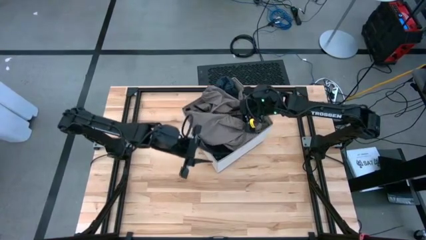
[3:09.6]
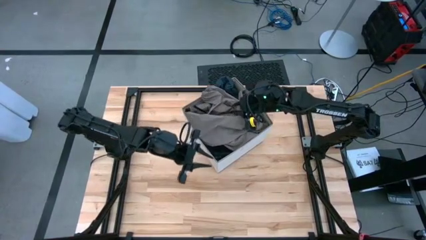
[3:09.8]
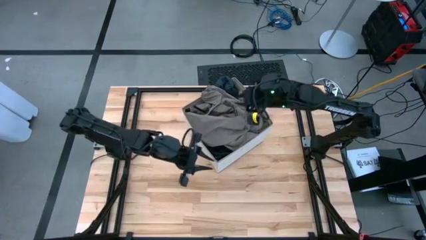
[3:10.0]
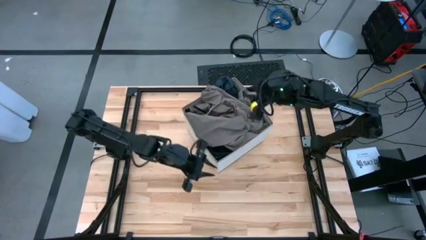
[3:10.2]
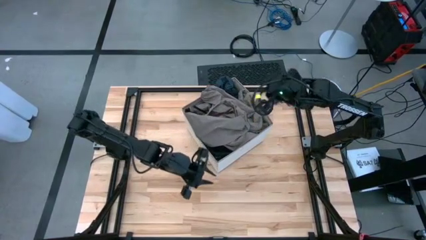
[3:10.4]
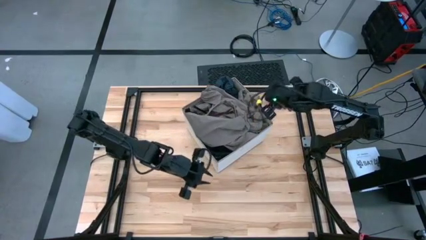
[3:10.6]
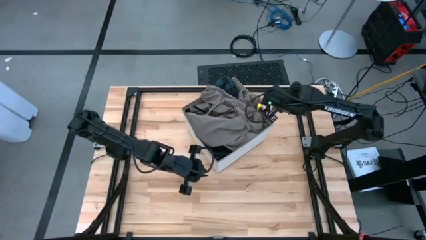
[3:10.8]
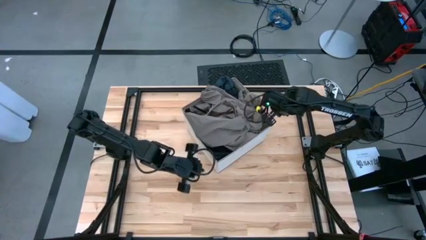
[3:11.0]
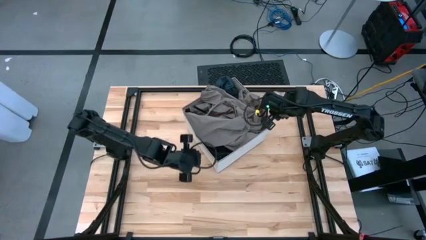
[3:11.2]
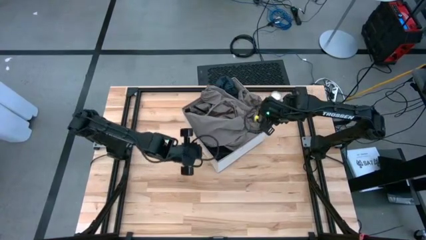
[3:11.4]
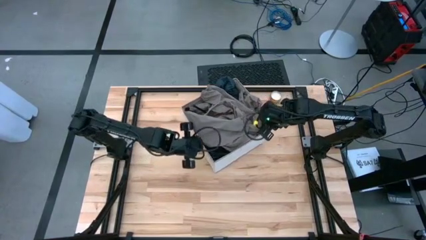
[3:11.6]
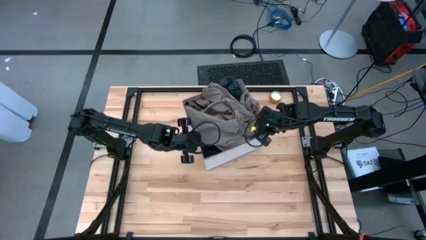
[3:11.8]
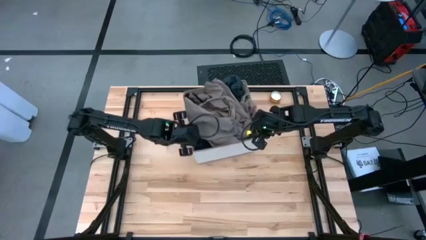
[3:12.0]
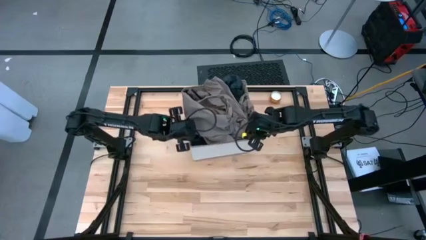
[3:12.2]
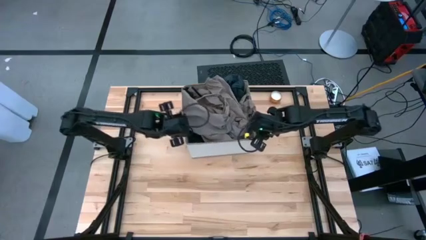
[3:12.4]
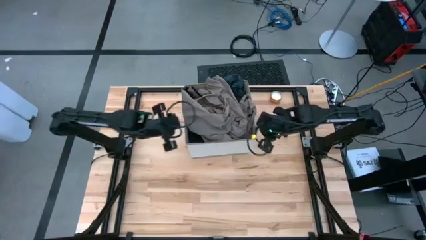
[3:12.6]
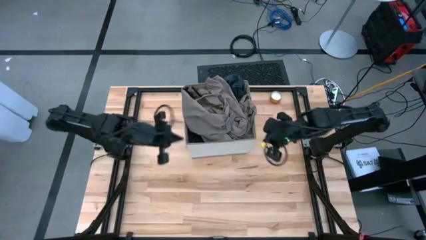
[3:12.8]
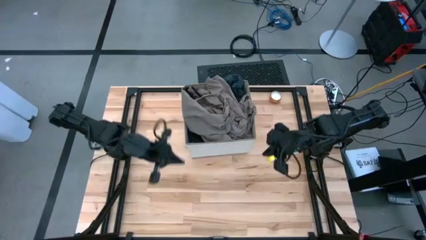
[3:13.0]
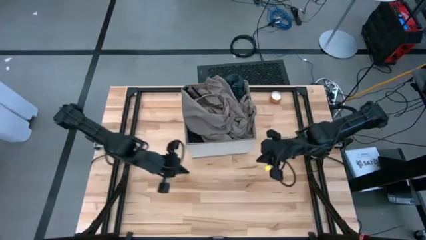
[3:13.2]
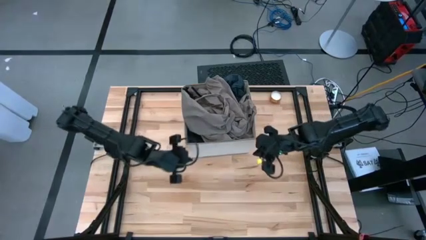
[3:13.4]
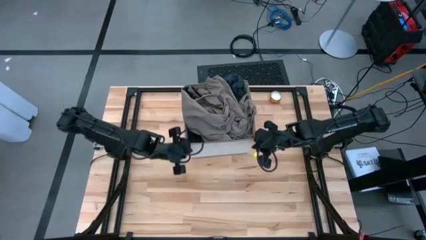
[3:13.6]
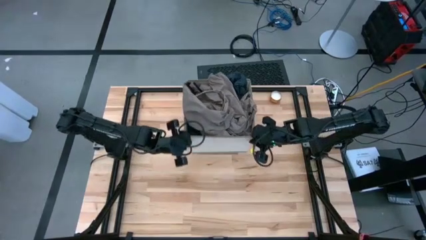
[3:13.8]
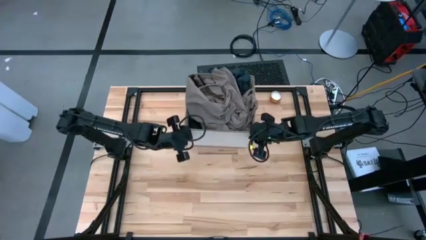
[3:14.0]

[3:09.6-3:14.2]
Task: Sort clothes
Adjust the laundry organizer

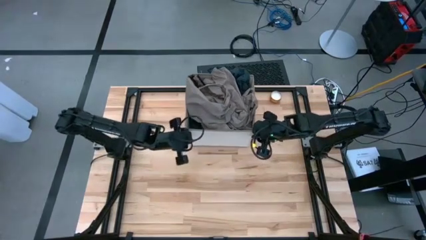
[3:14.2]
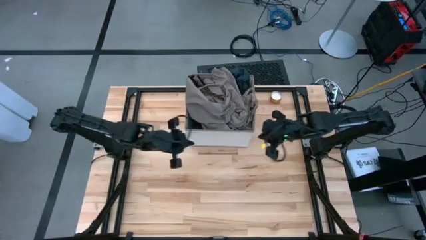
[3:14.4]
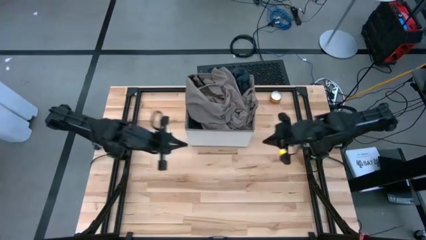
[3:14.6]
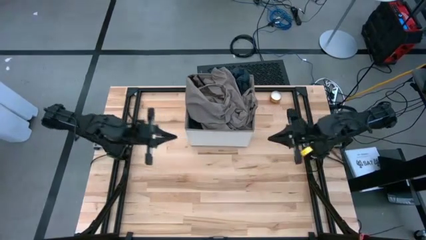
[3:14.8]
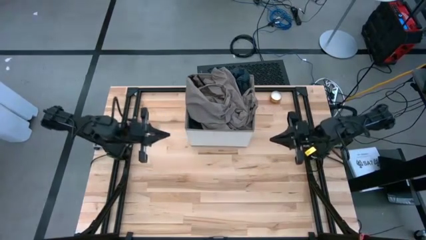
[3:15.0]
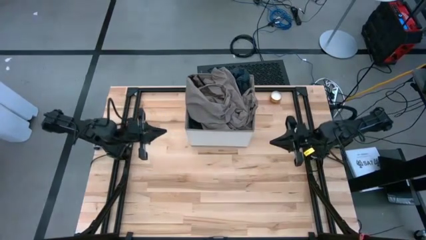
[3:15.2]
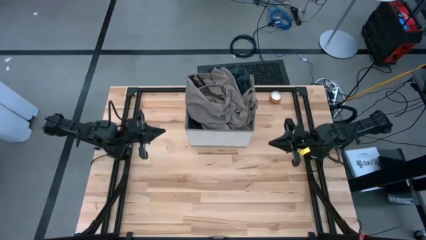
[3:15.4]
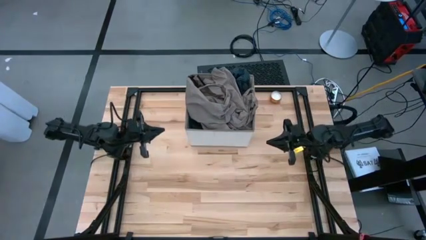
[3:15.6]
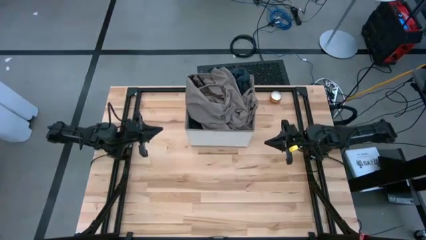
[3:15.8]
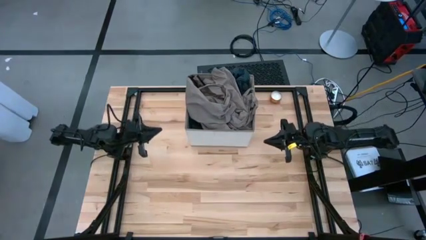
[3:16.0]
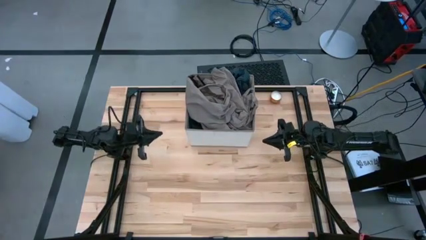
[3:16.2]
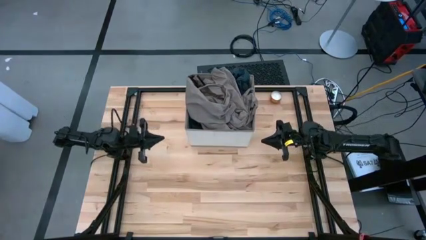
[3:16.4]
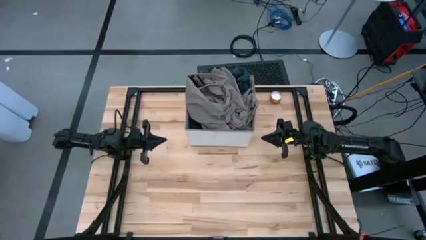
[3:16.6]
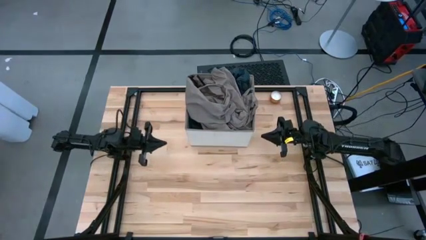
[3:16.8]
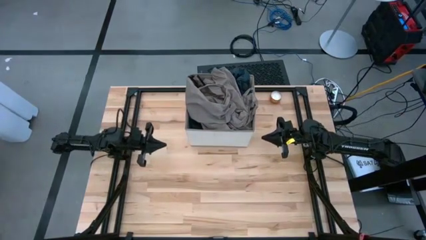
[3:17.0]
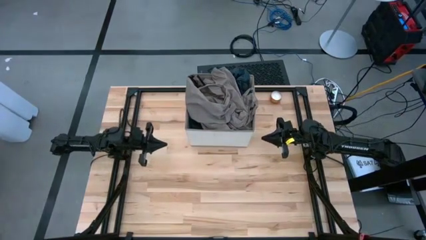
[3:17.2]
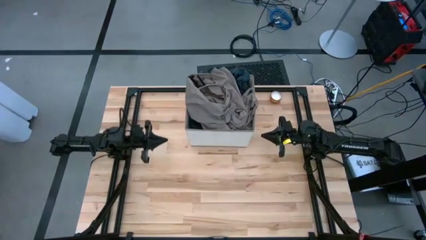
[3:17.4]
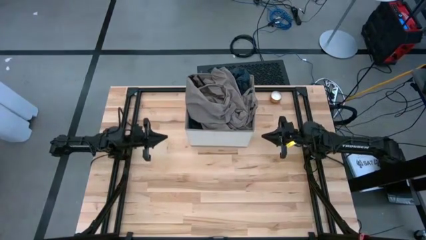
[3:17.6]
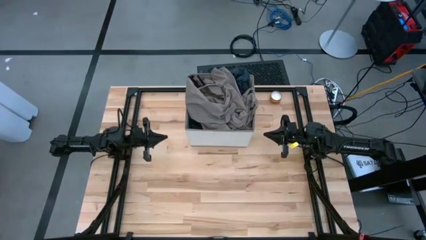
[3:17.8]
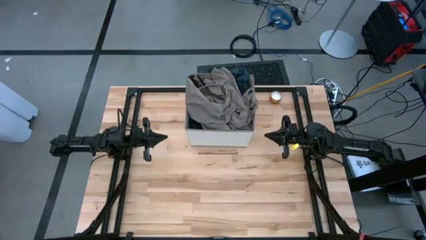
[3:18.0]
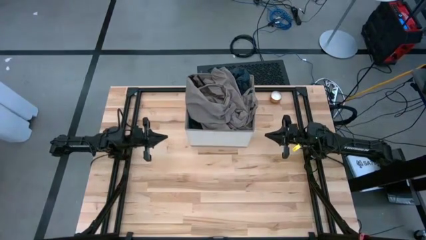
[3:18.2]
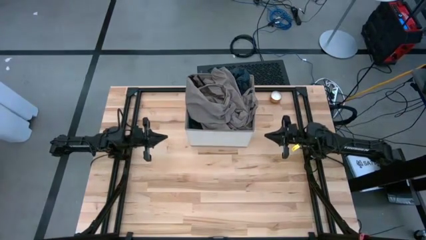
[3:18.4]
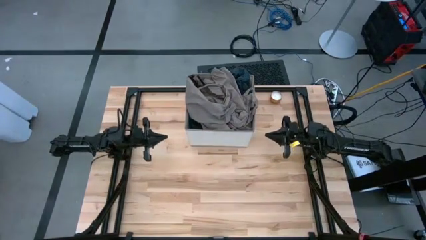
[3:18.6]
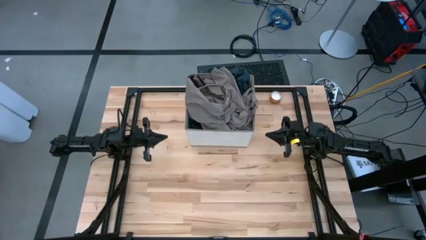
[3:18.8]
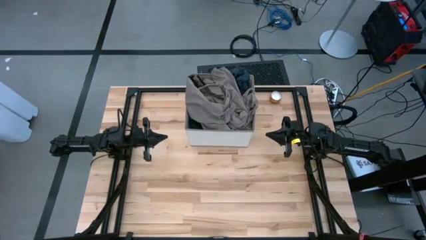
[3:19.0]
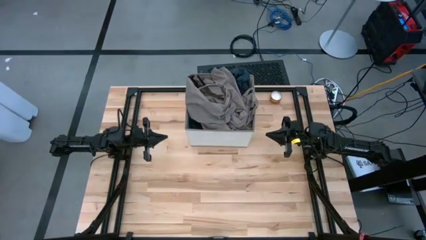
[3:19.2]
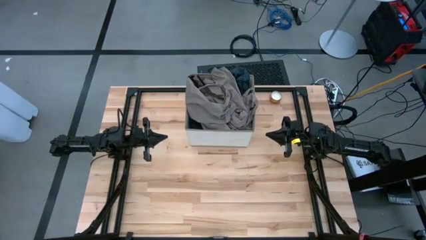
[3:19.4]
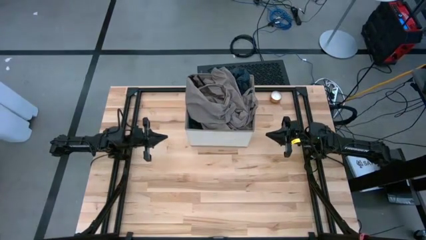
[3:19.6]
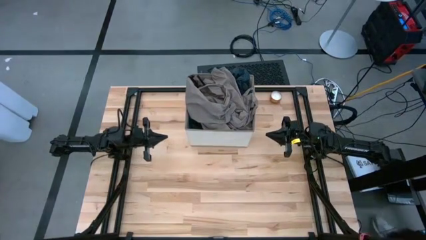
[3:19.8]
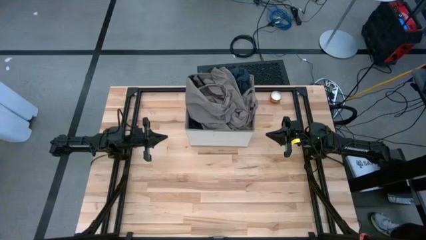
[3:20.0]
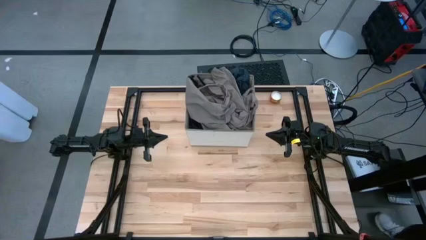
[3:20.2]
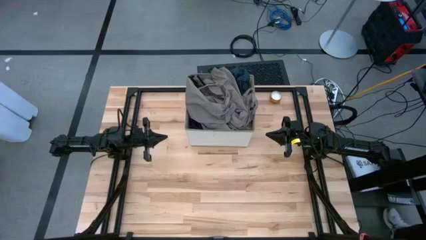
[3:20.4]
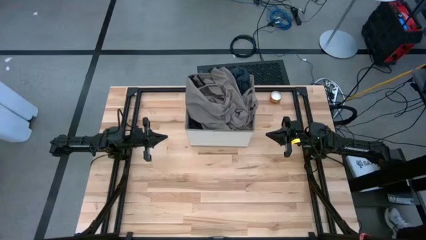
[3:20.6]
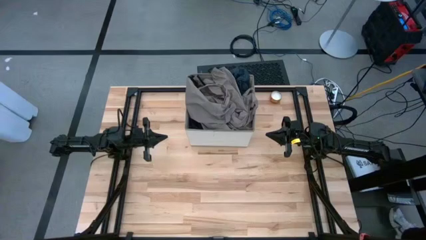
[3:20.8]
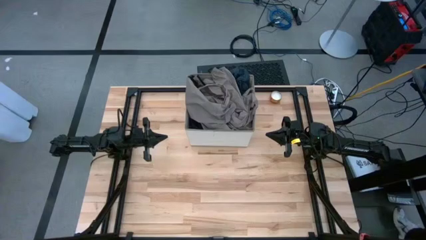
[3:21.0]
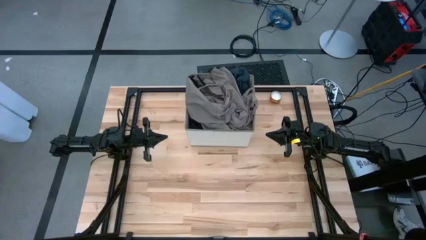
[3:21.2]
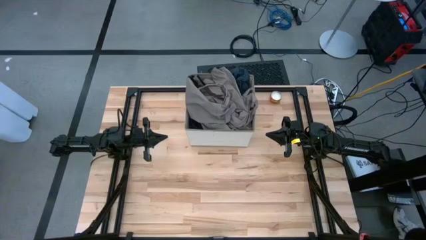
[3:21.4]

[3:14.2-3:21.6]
Return to Home Position
